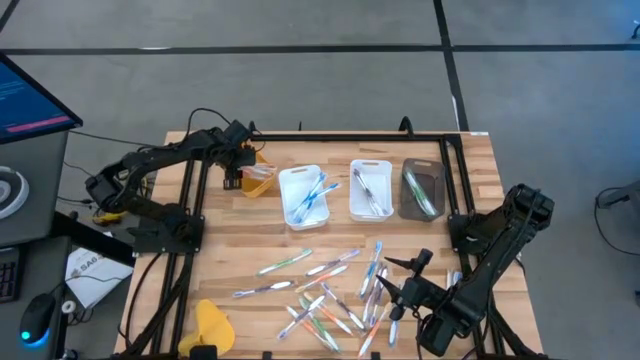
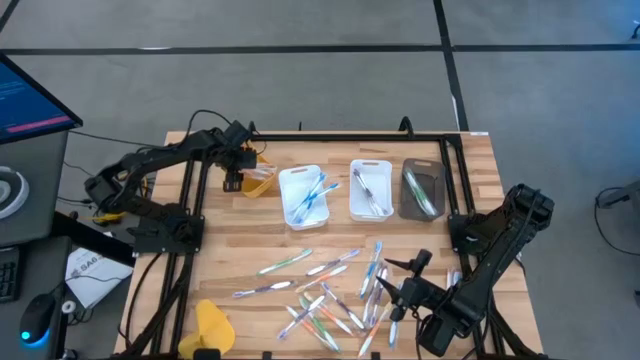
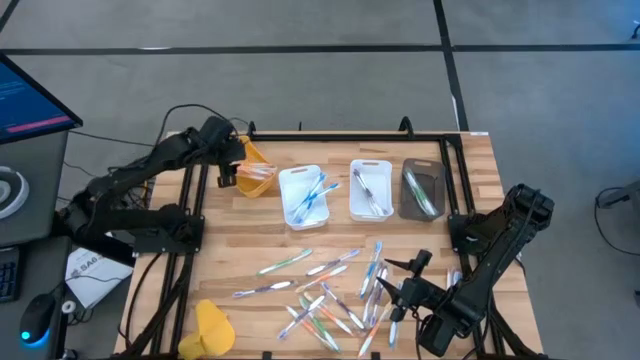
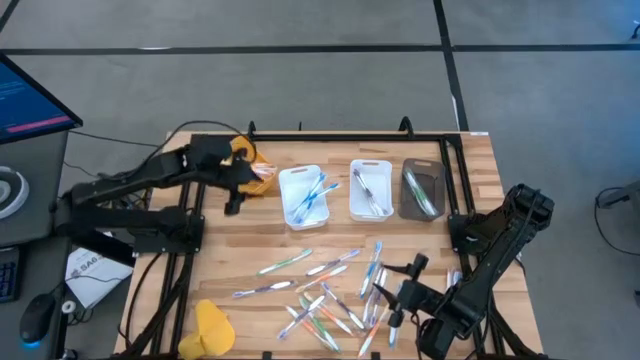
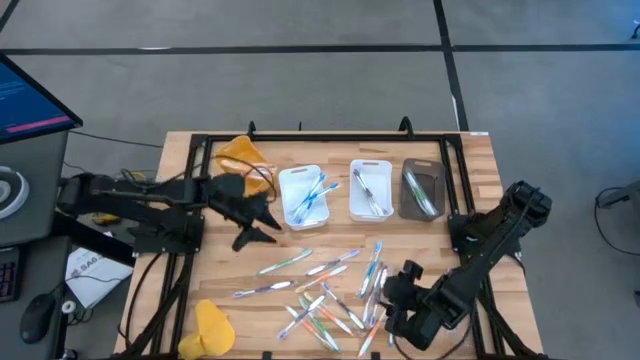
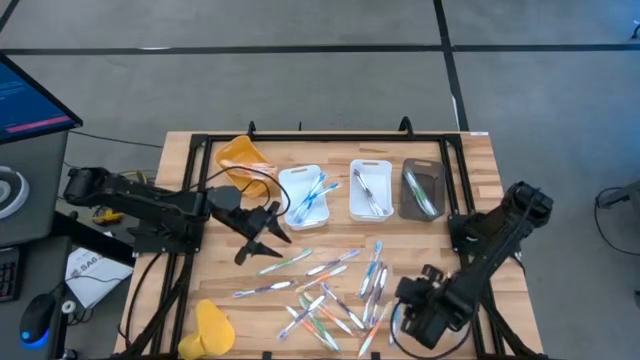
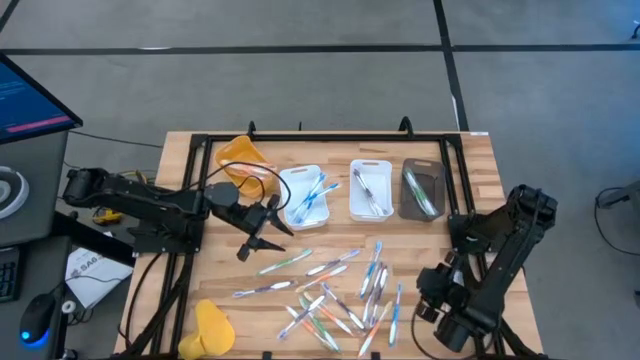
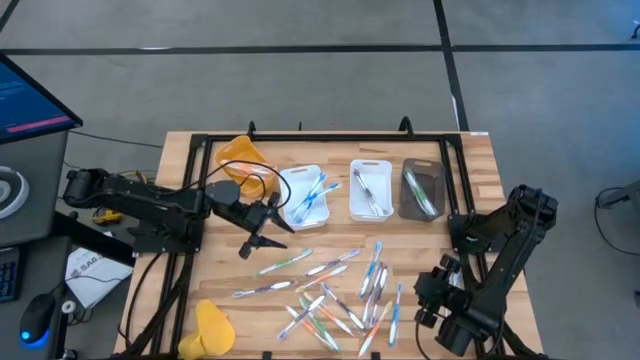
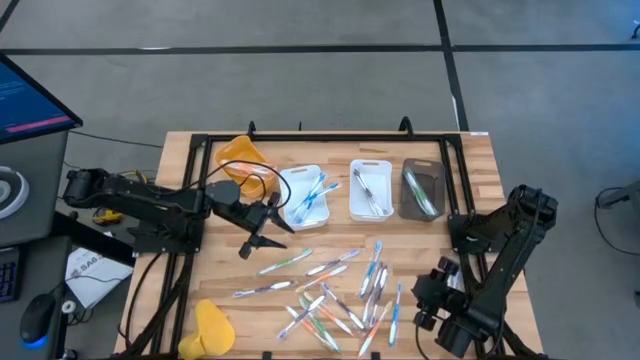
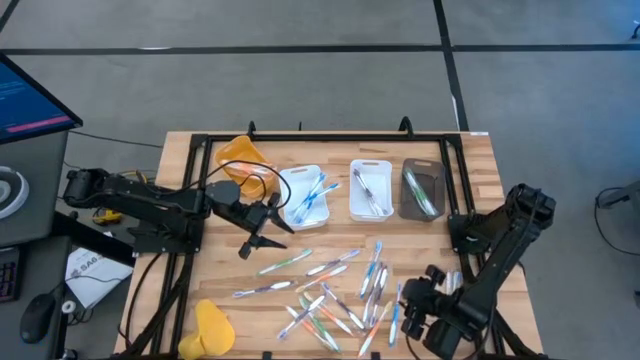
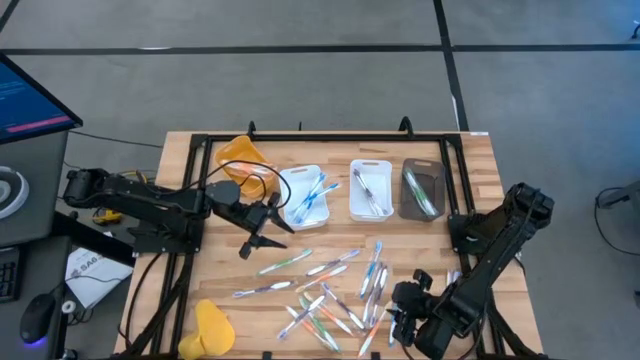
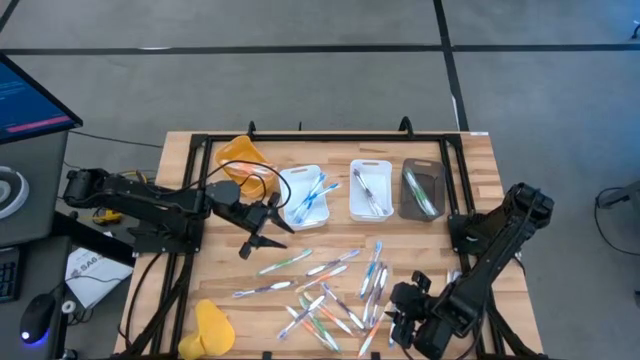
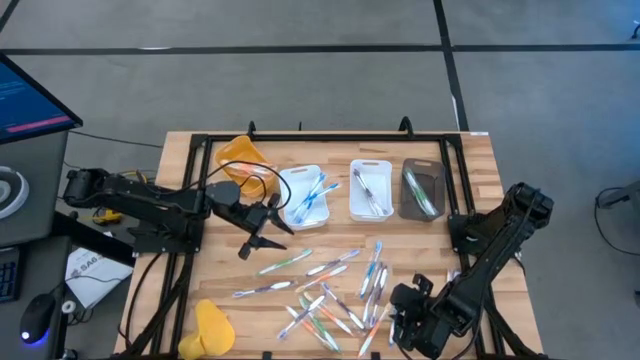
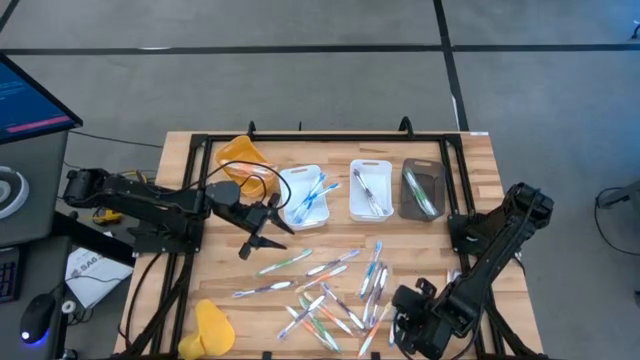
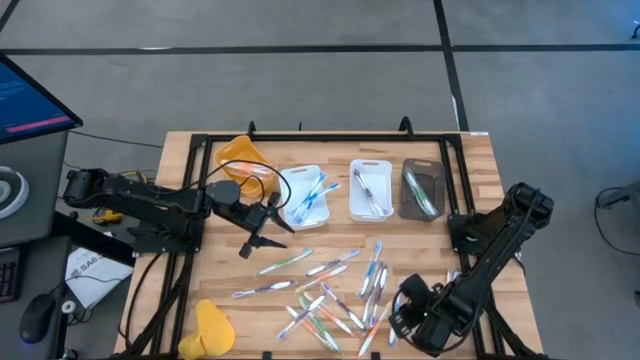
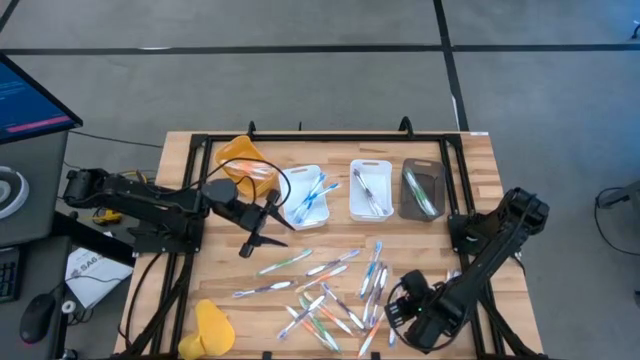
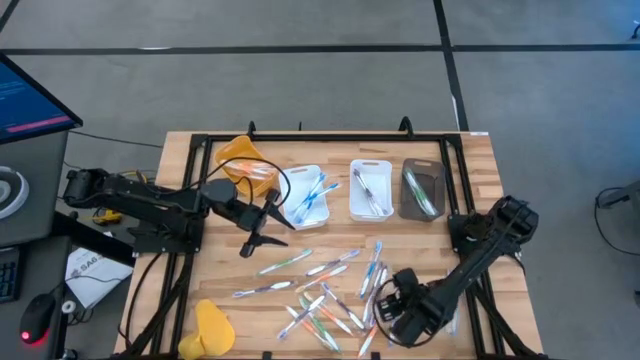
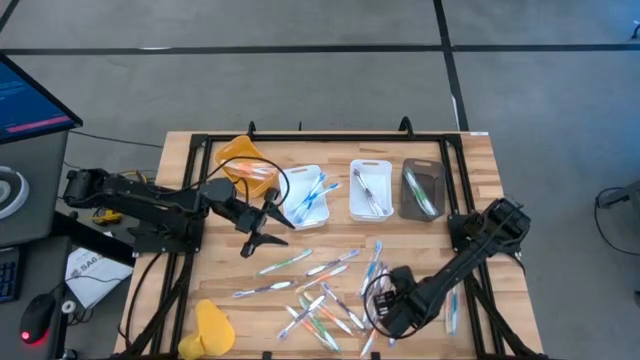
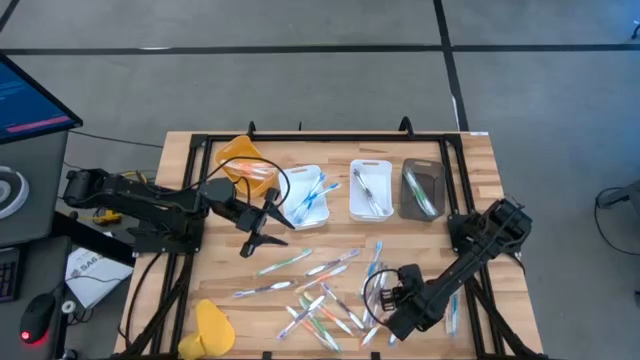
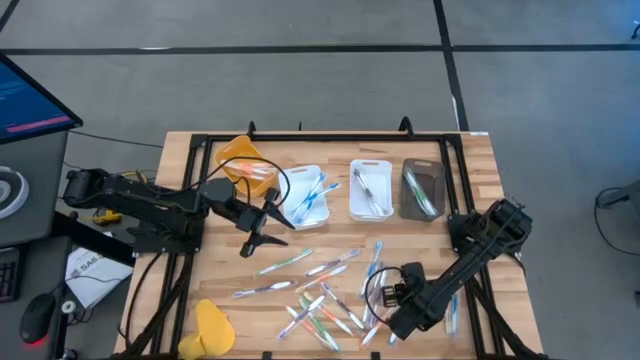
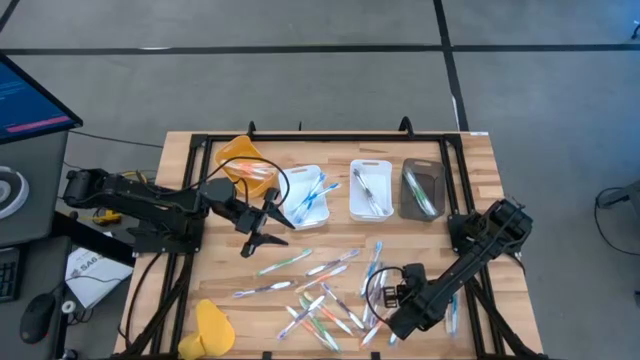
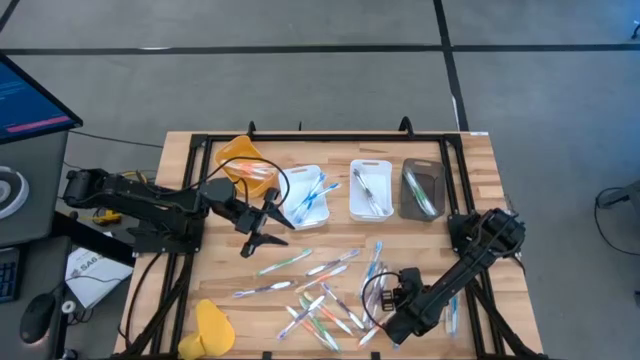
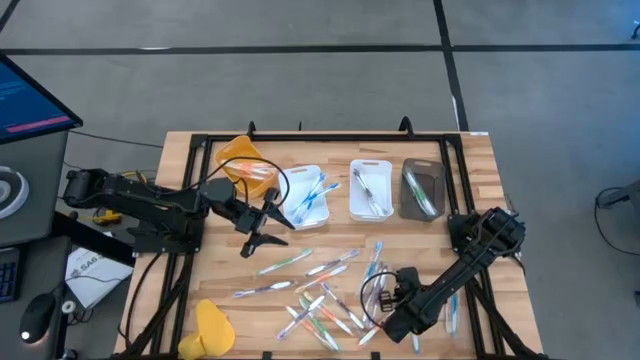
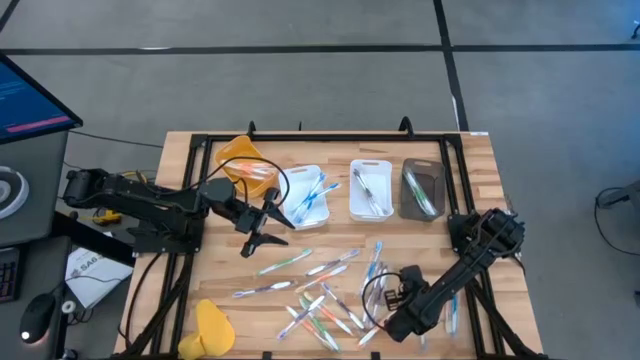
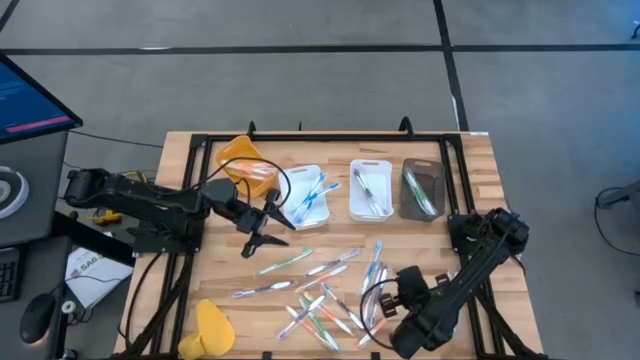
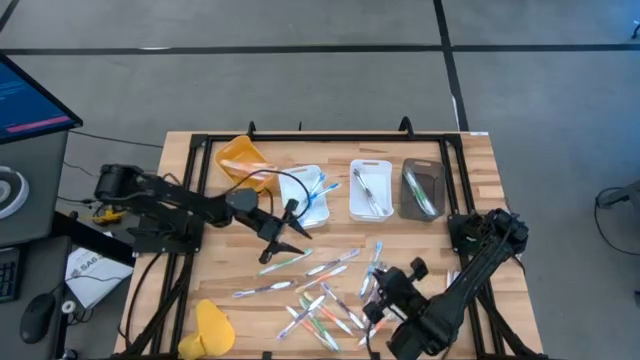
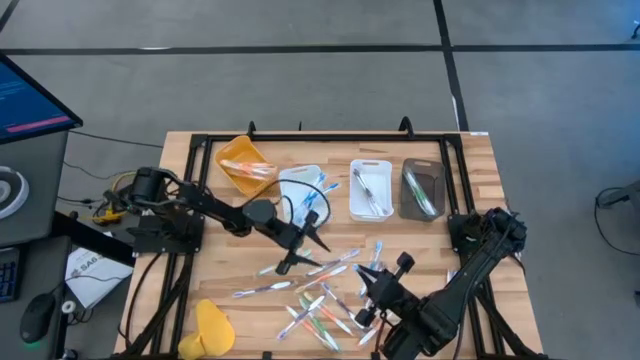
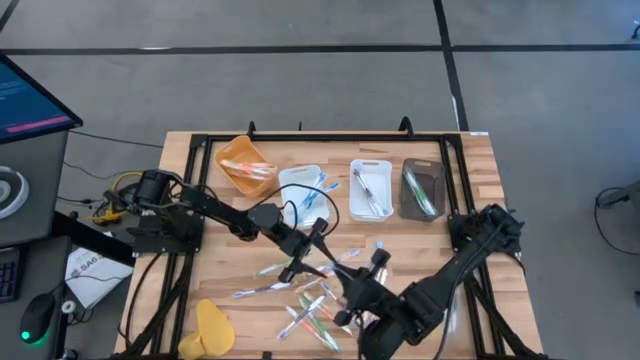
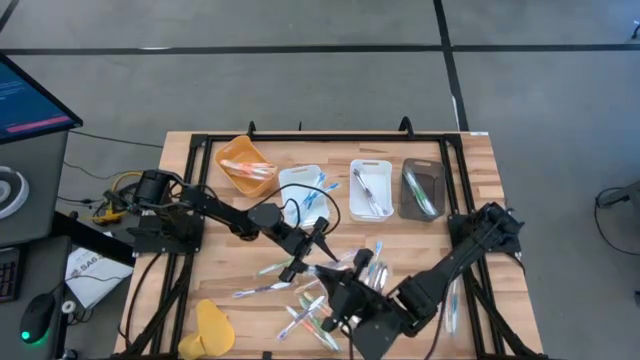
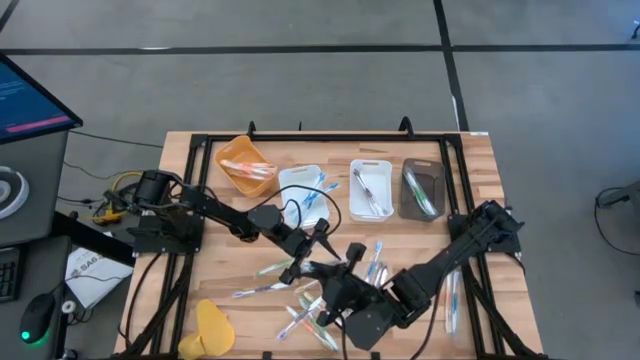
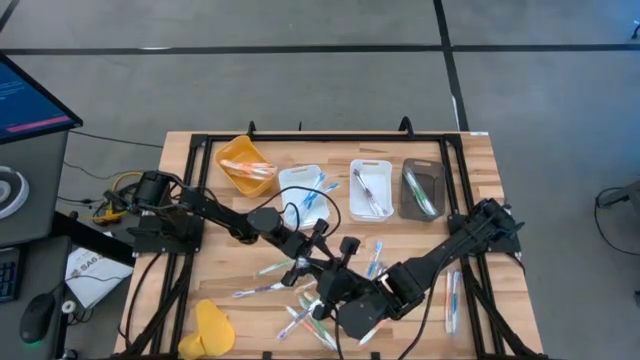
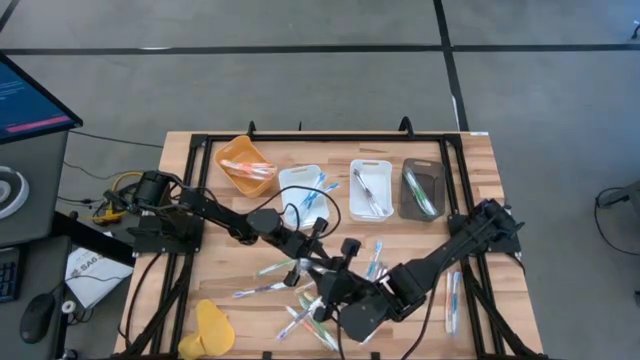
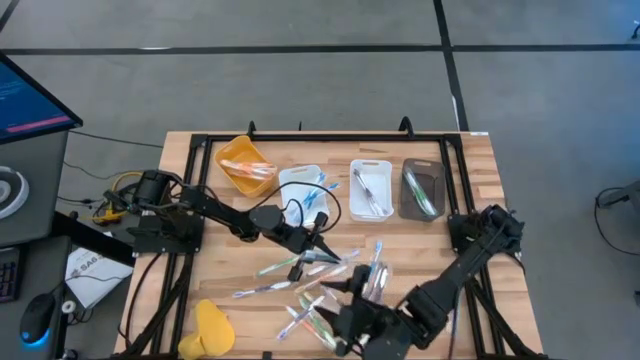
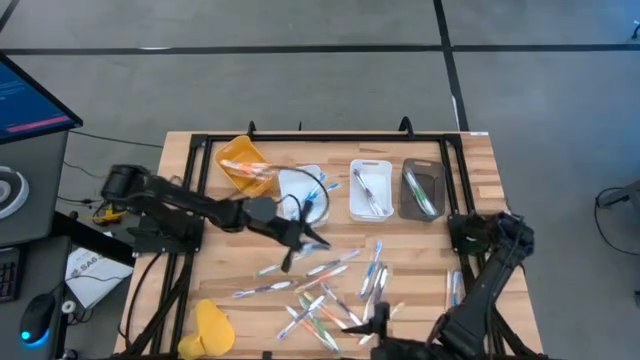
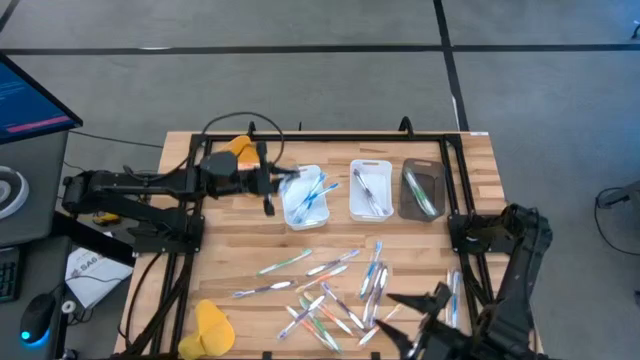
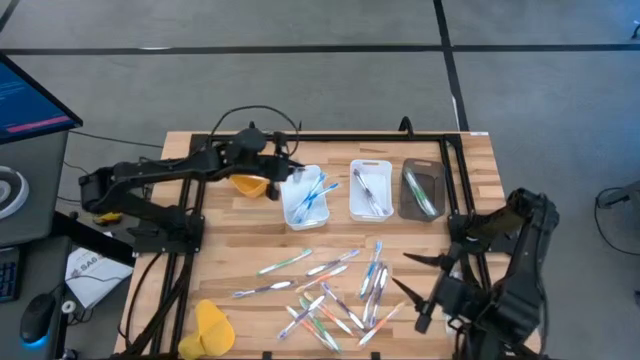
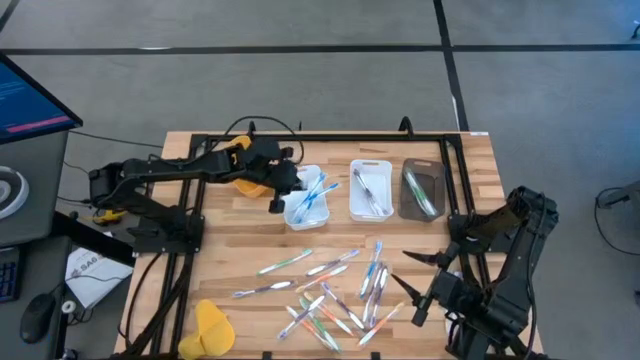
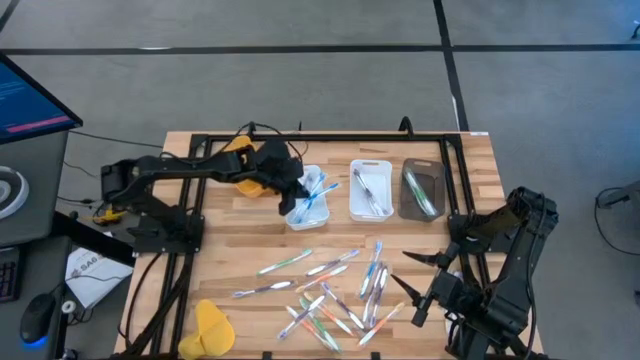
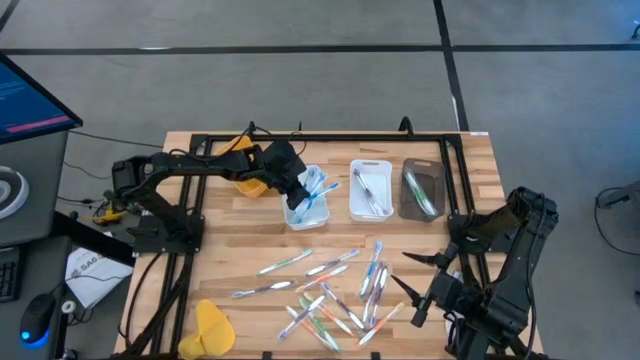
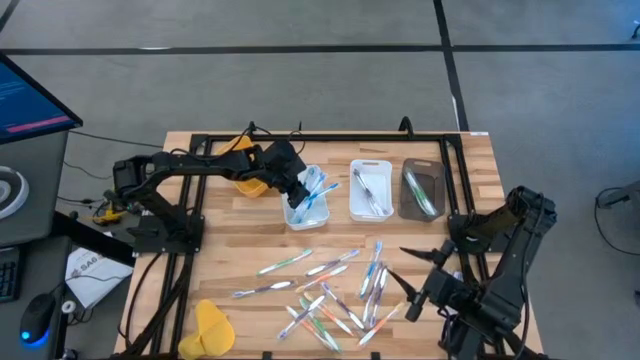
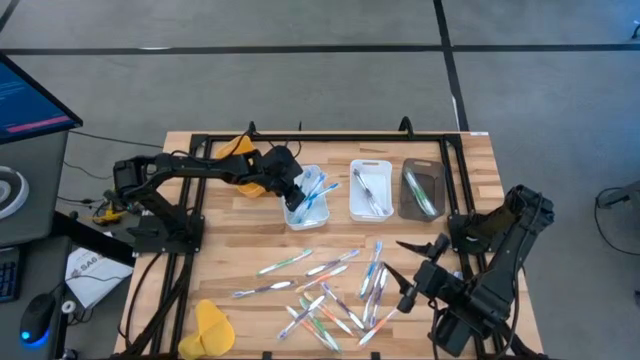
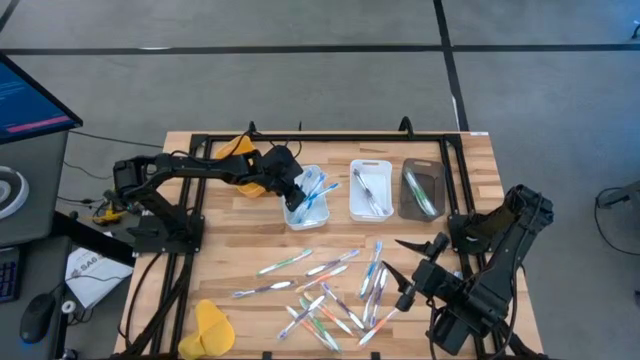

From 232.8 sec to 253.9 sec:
Task: Pick & Place Toothbrushes
Put the middle blue toothbrush into the left white bin

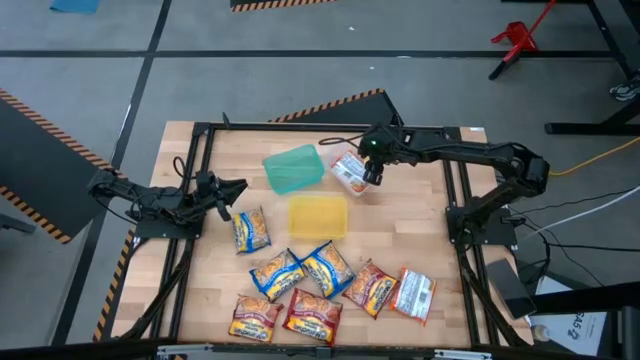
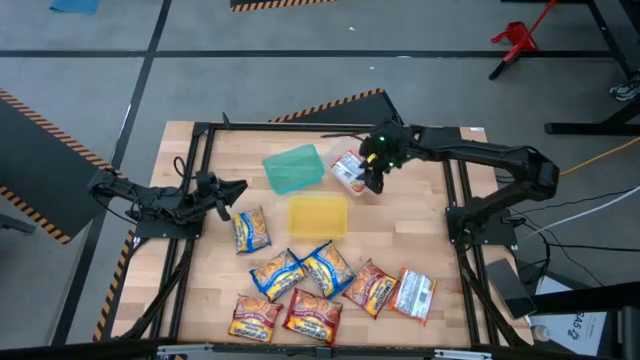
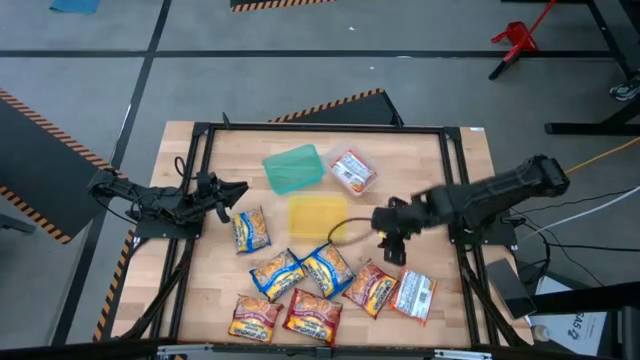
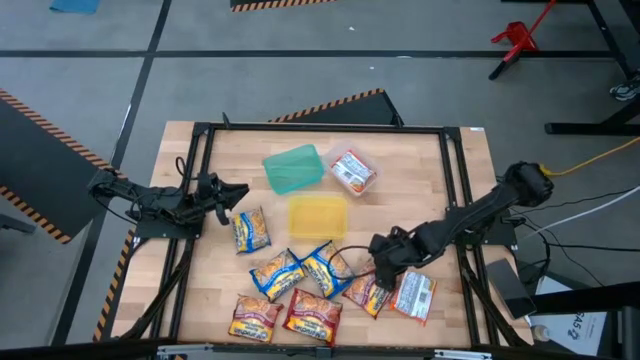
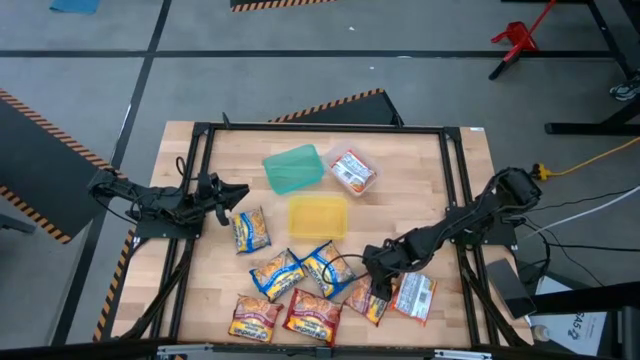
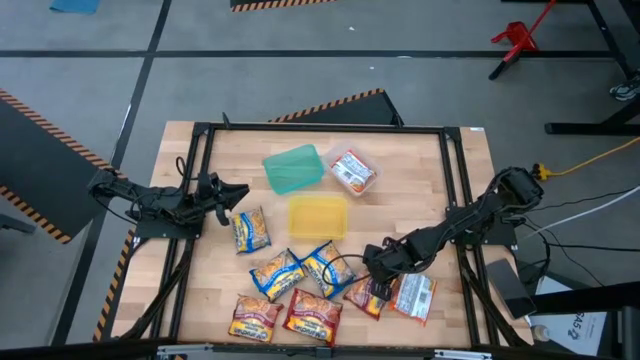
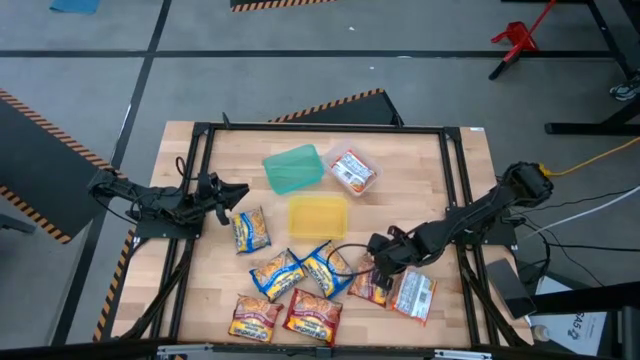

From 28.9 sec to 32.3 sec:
Task: Sort Maruchan noodles
Put the right red noodle pack into the yellow bin
